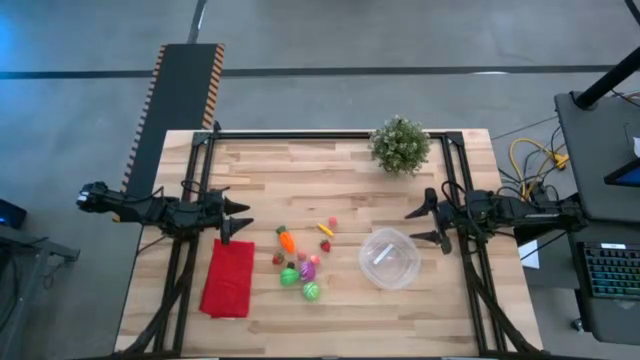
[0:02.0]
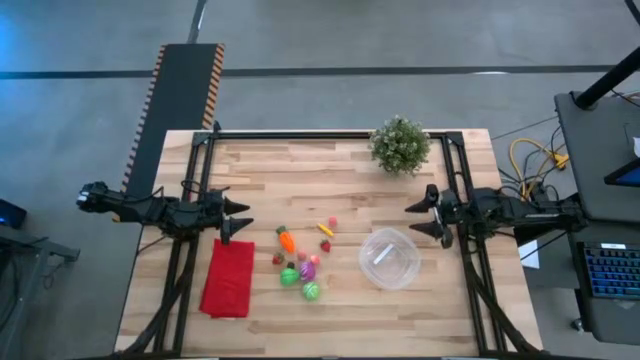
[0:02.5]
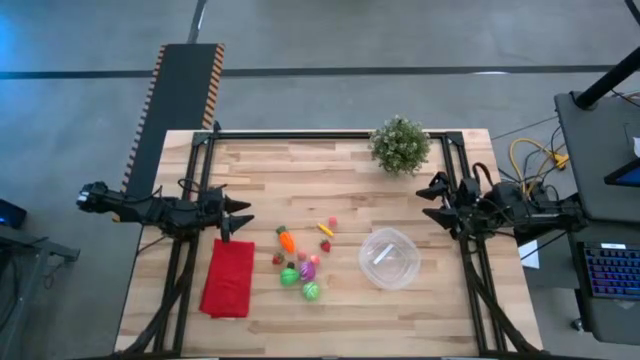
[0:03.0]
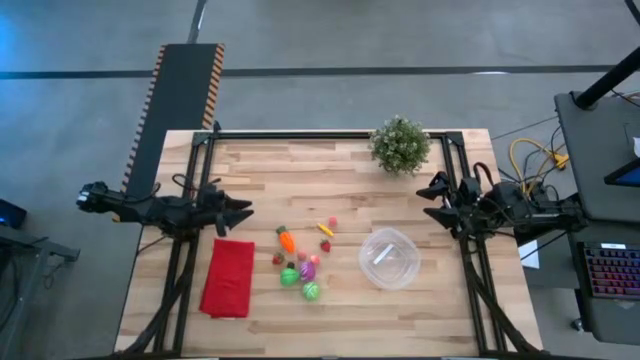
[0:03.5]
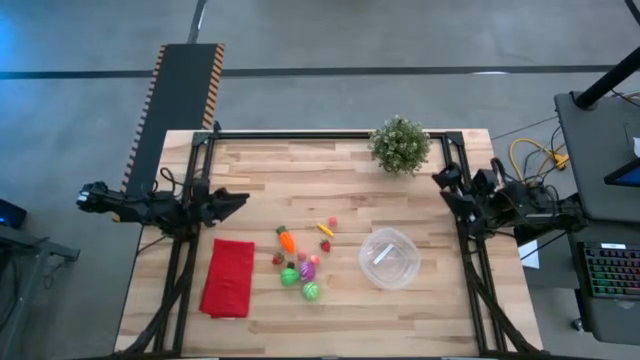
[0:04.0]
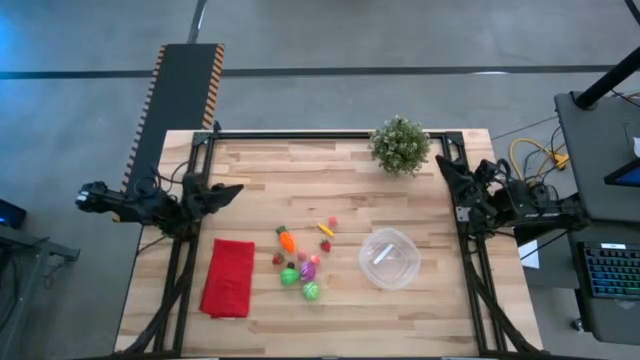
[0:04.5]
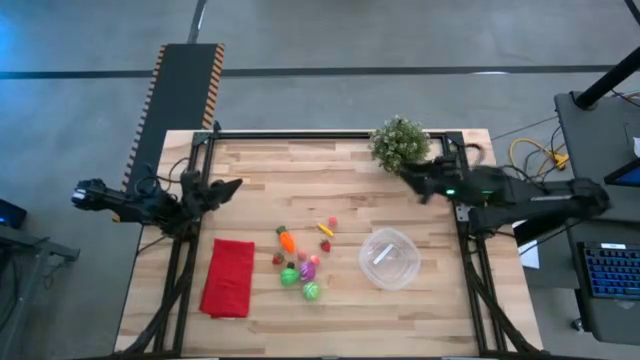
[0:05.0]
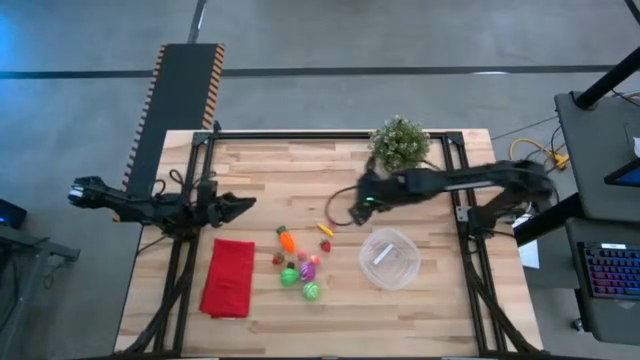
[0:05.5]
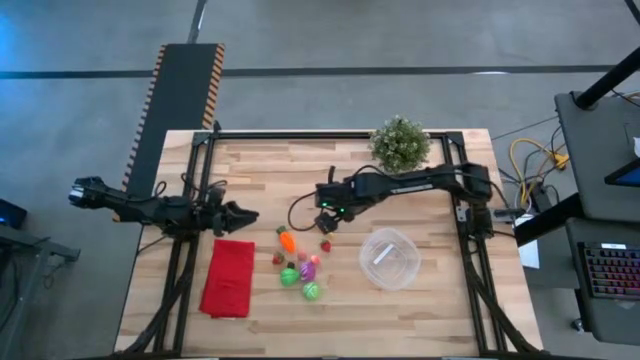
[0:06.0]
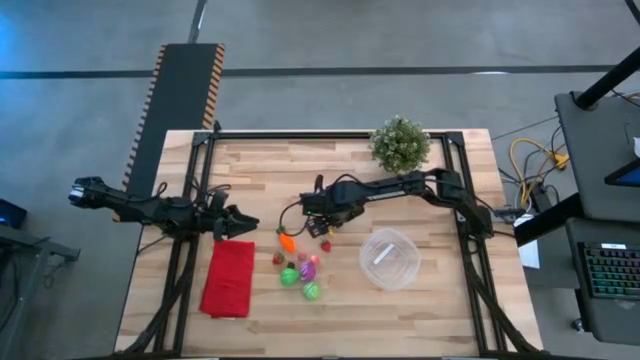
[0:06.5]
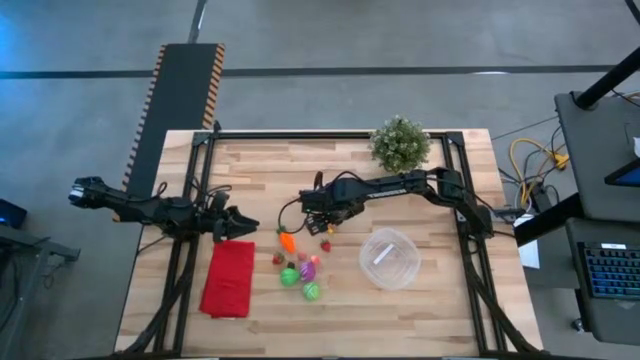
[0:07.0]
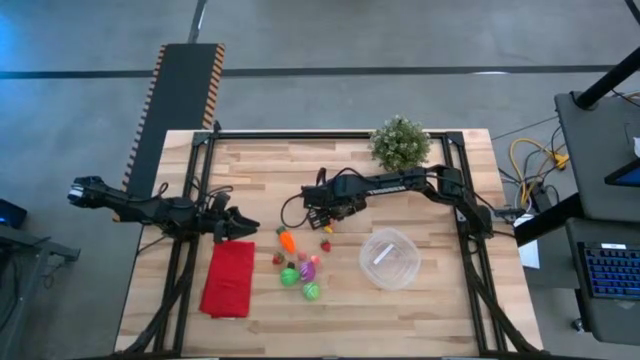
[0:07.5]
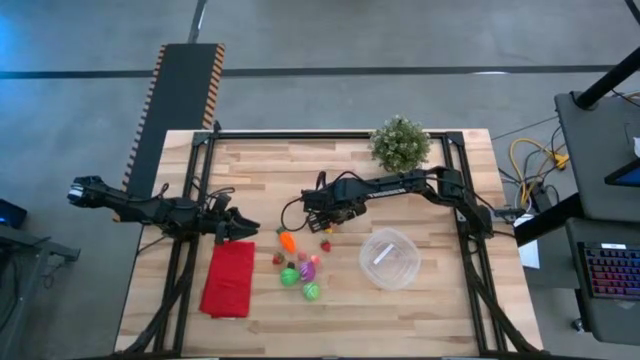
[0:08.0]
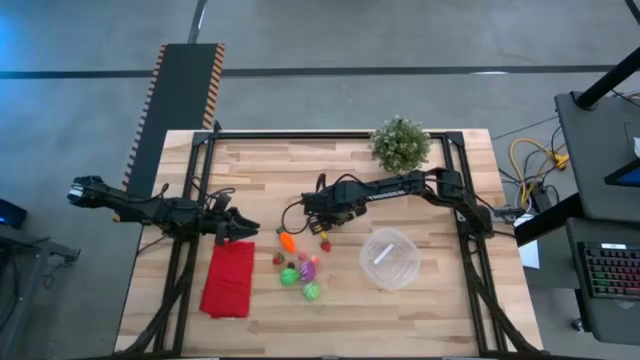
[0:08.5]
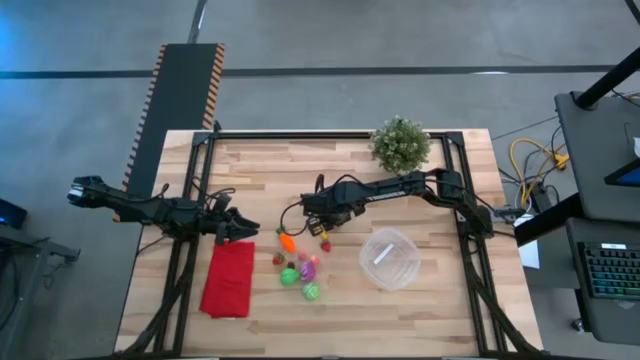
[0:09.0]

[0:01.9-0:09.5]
Task: Pick and placing Produce into tupperware
Put the top pink peach into the transparent bin

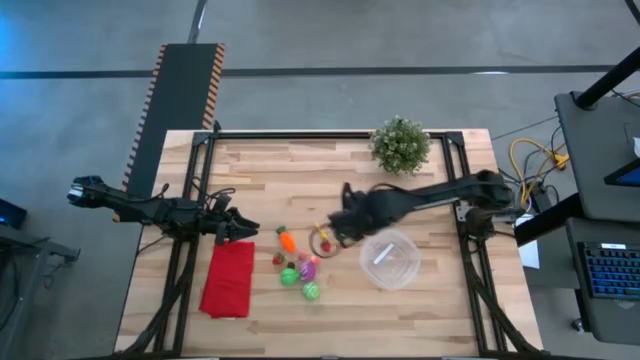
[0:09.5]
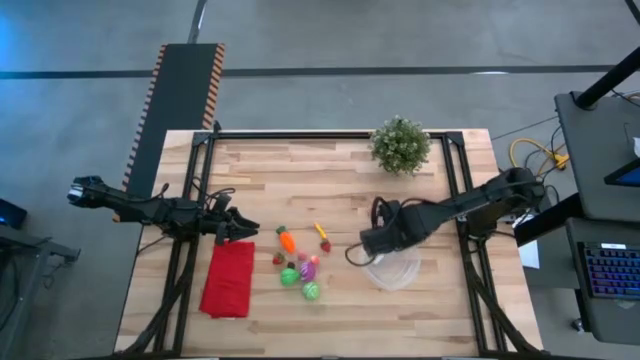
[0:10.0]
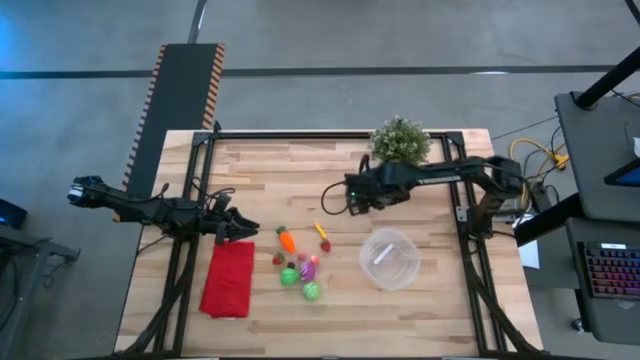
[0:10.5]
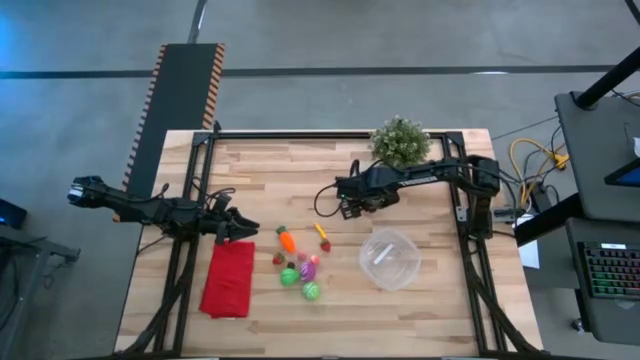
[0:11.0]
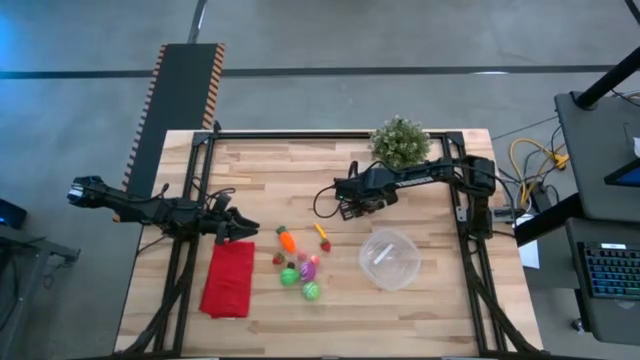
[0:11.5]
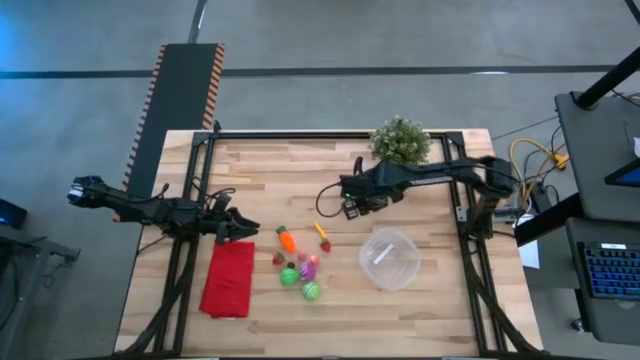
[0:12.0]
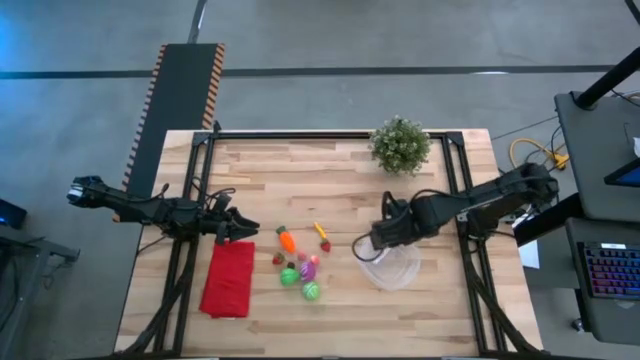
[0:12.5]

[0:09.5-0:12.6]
Put the top pink peach into the transparent bin

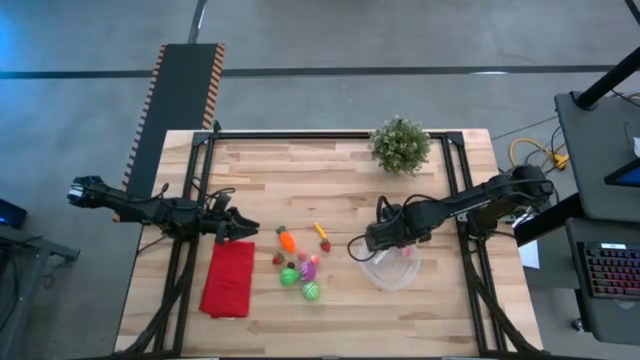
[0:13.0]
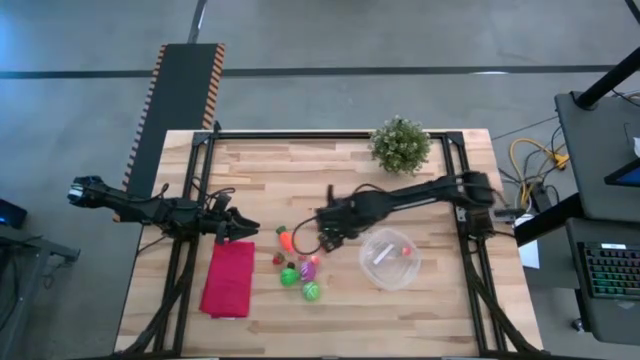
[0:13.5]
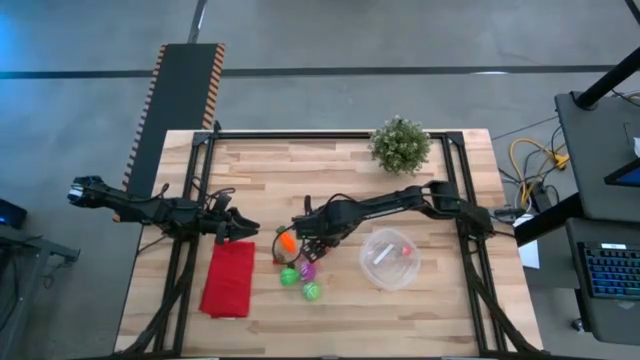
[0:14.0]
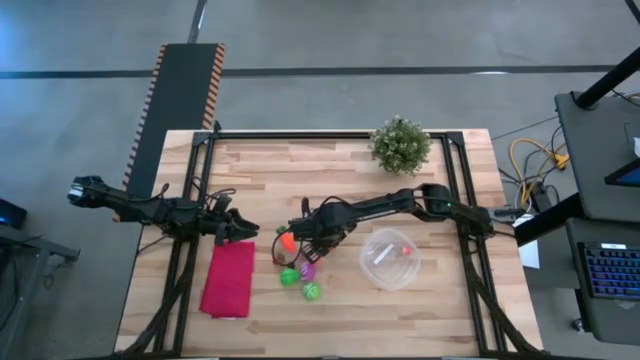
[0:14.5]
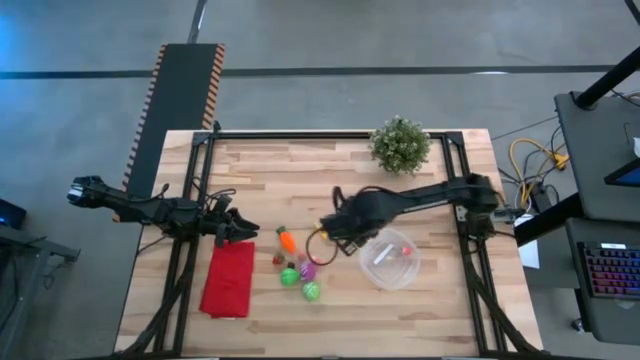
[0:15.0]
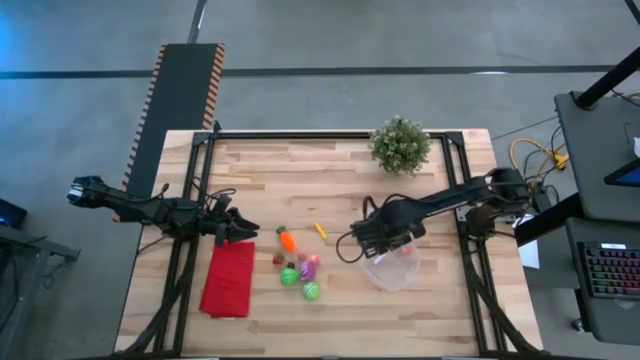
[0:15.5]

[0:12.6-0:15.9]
Put the right red strawberry into the transparent bin

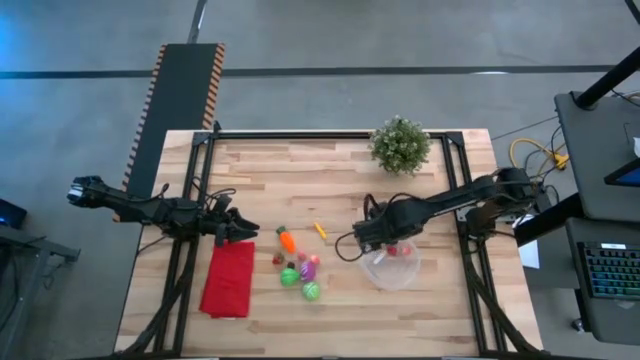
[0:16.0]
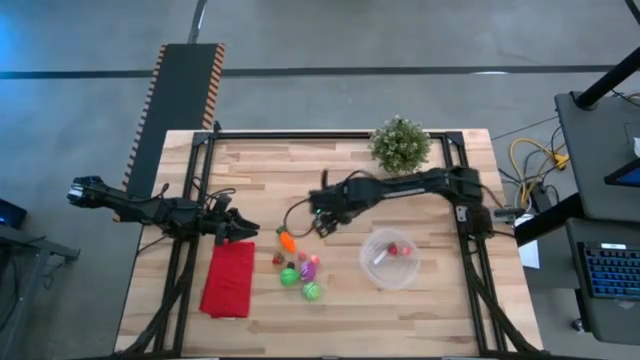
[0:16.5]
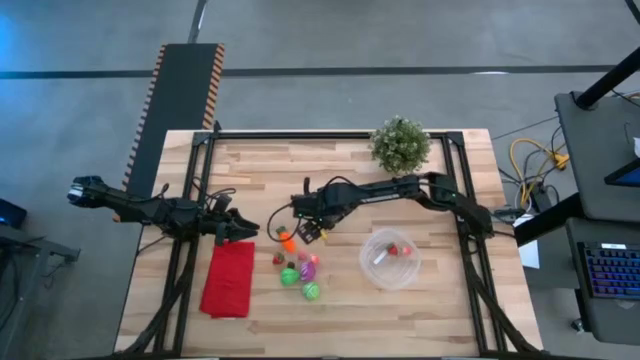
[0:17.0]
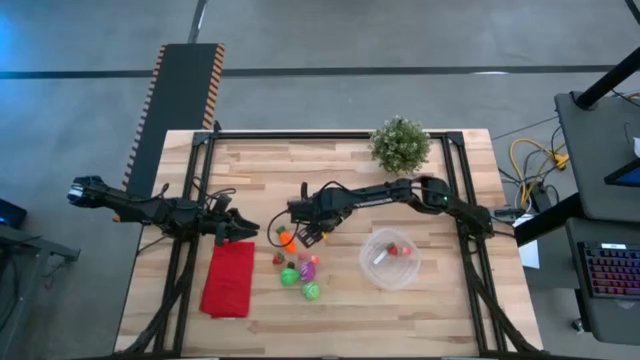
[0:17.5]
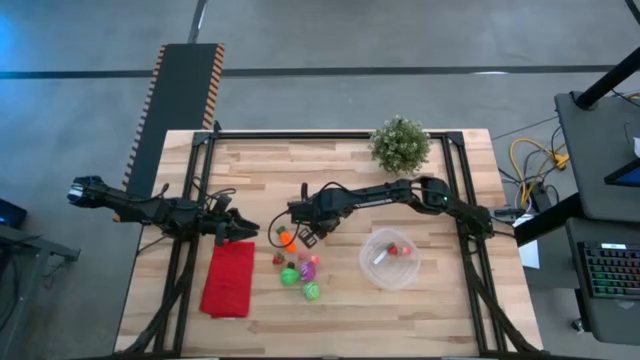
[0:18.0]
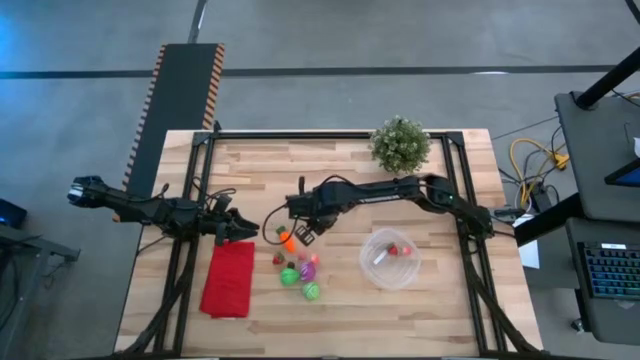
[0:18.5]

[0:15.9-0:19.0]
Put the yellow corn into the transparent bin

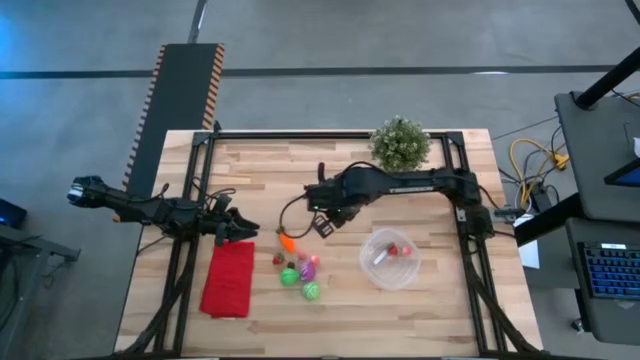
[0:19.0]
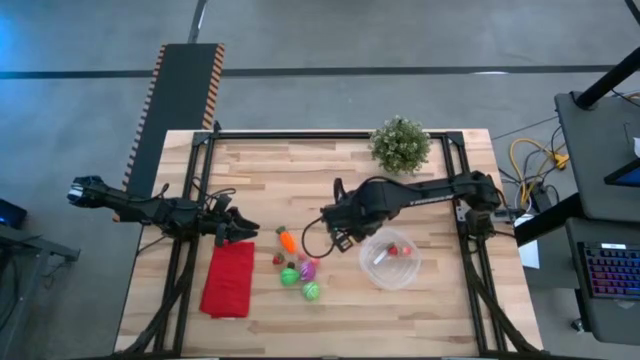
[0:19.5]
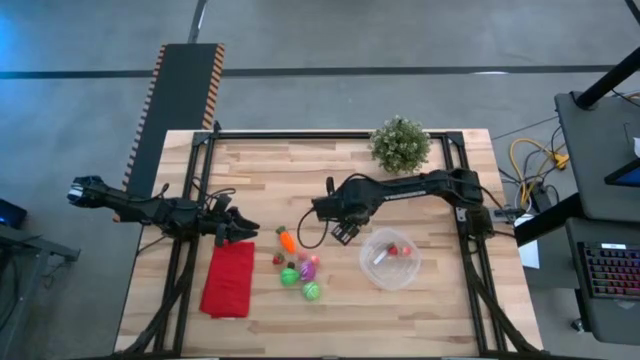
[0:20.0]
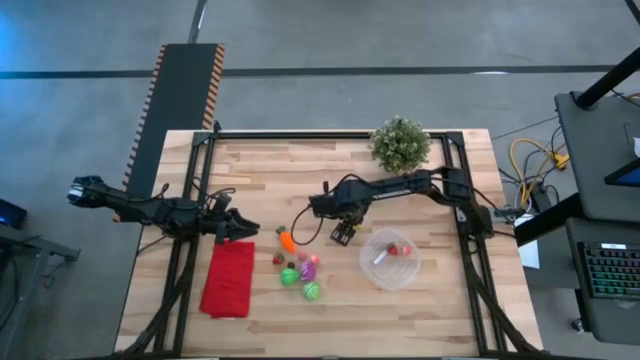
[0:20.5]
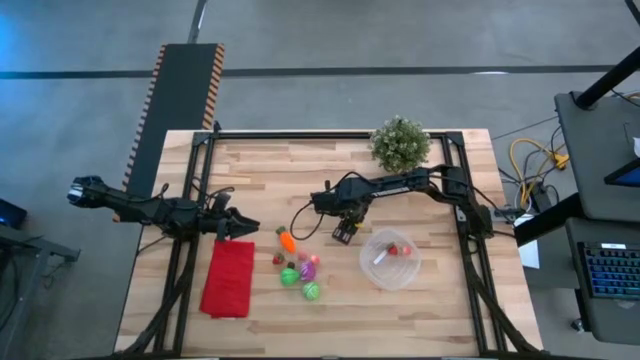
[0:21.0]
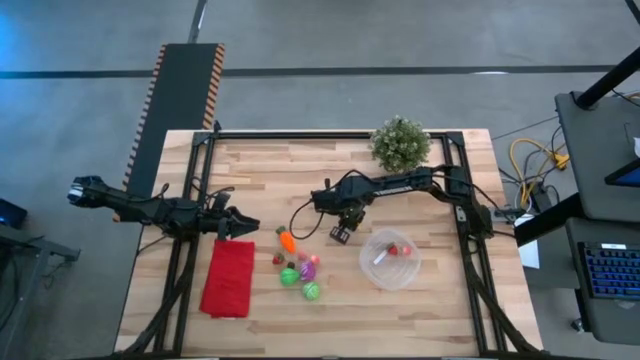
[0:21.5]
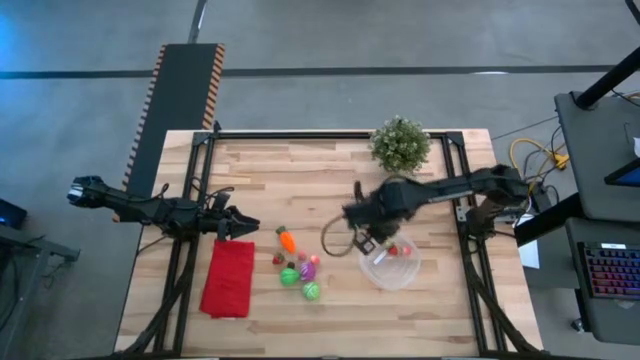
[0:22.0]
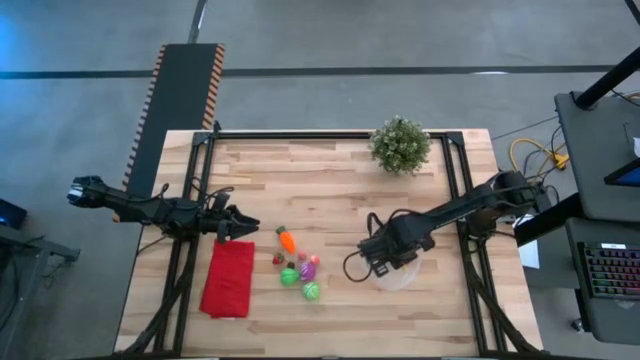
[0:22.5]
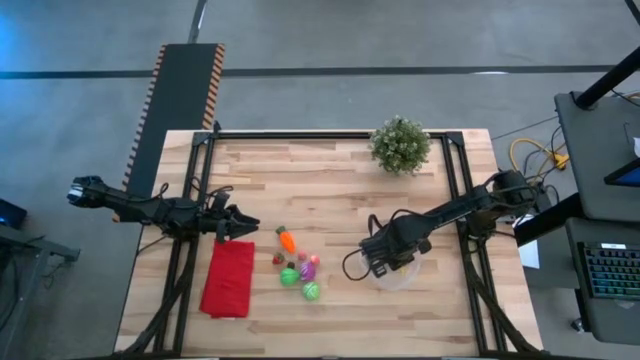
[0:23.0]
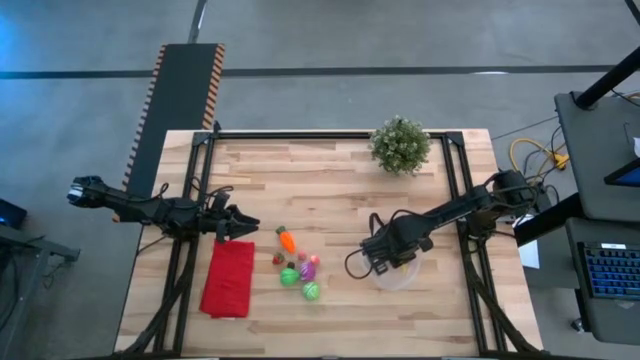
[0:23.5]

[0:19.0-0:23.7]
Put the yellow corn into the transparent bin
